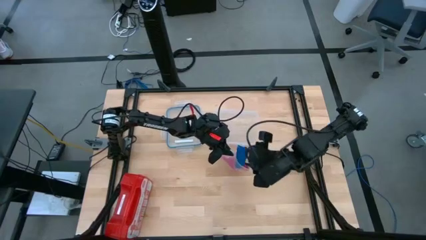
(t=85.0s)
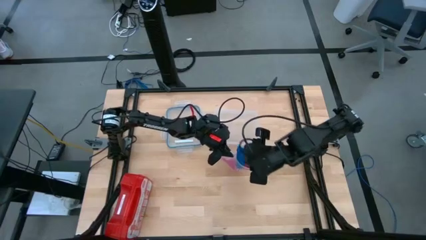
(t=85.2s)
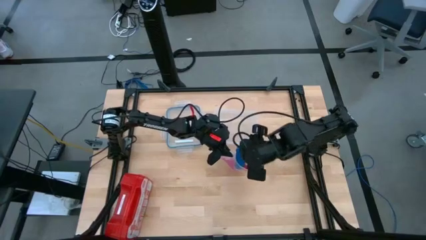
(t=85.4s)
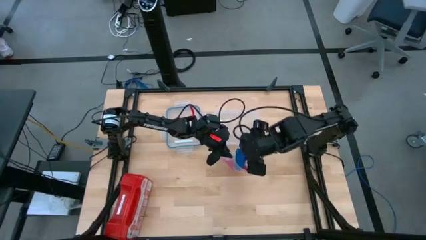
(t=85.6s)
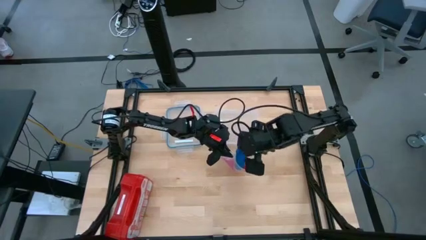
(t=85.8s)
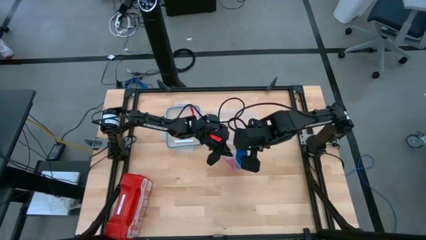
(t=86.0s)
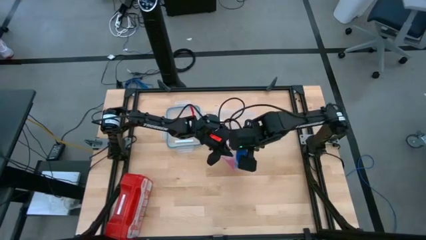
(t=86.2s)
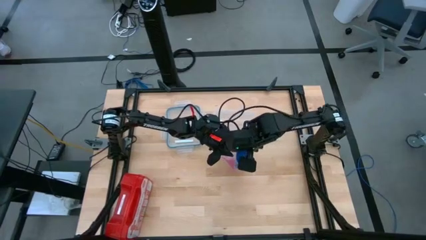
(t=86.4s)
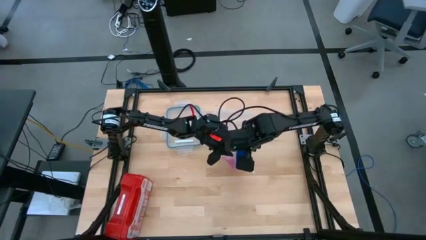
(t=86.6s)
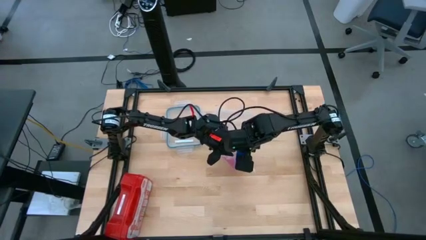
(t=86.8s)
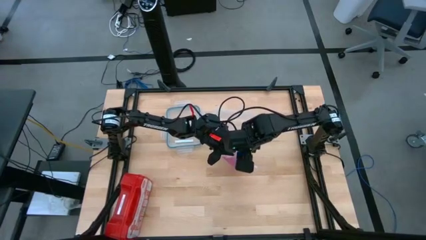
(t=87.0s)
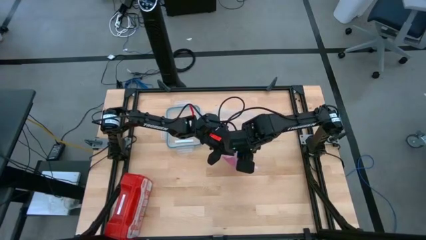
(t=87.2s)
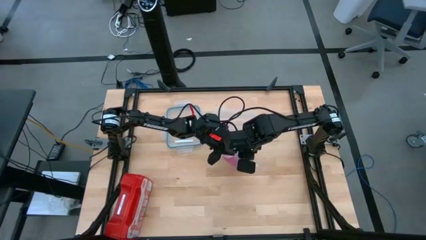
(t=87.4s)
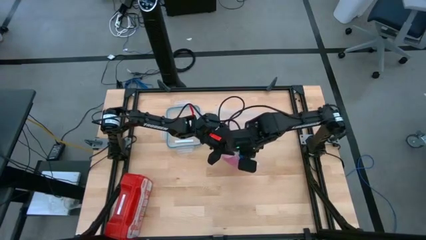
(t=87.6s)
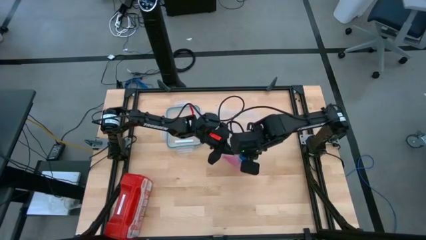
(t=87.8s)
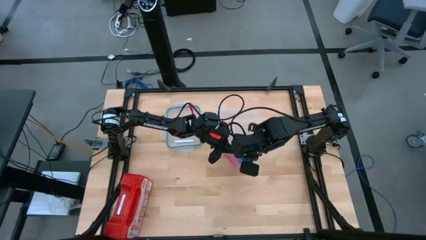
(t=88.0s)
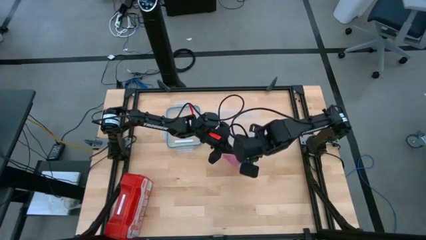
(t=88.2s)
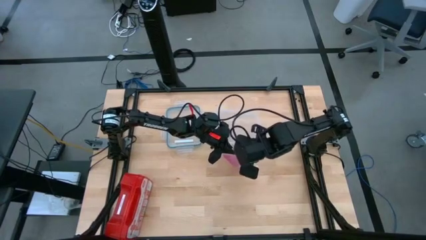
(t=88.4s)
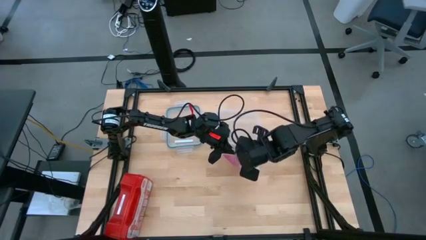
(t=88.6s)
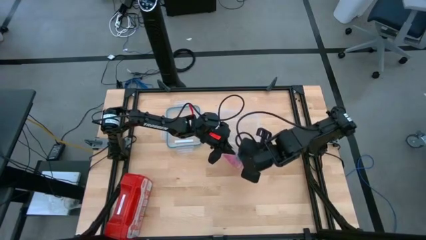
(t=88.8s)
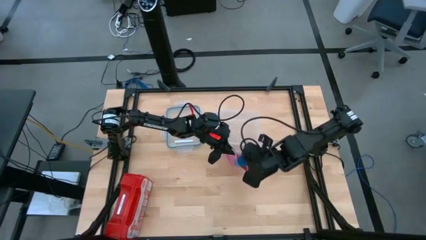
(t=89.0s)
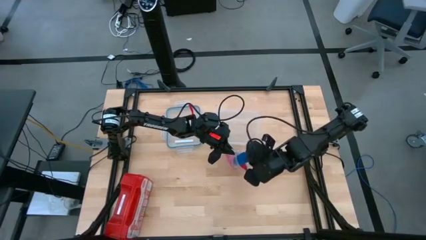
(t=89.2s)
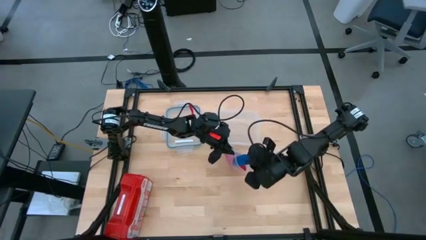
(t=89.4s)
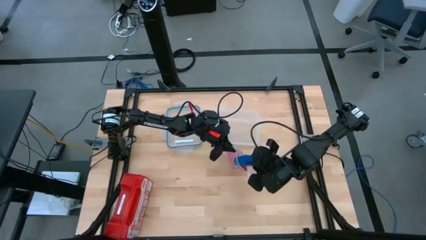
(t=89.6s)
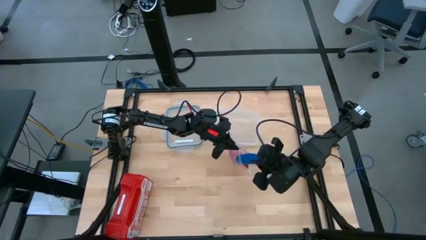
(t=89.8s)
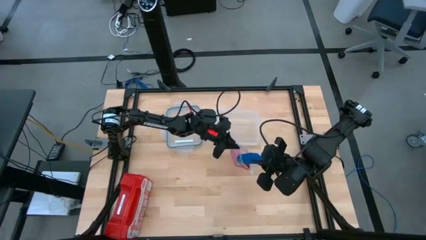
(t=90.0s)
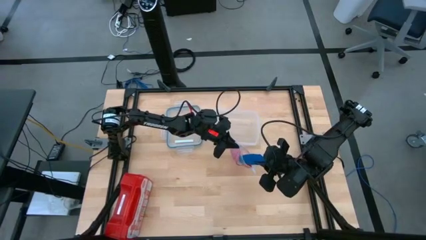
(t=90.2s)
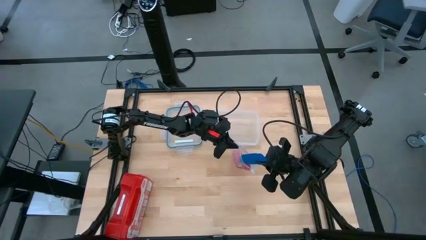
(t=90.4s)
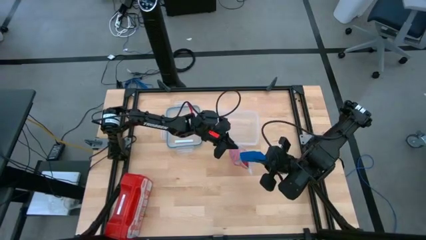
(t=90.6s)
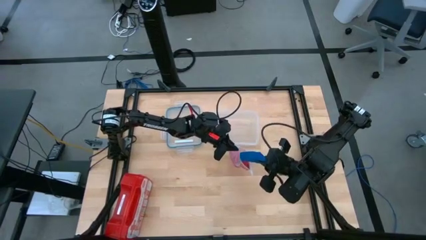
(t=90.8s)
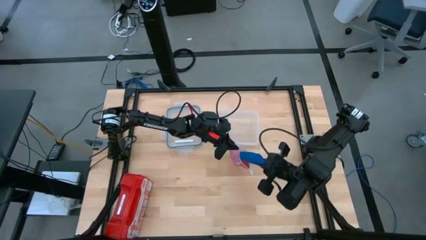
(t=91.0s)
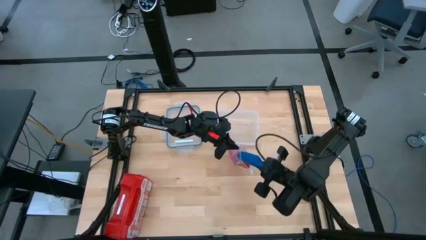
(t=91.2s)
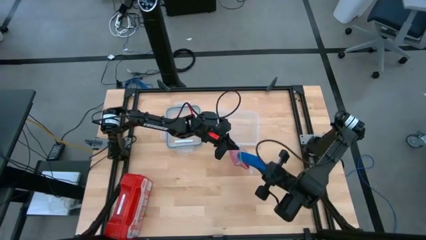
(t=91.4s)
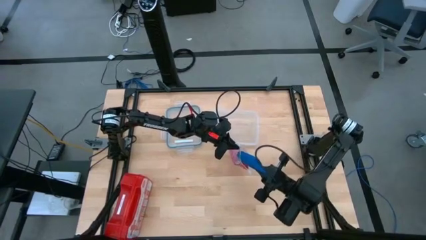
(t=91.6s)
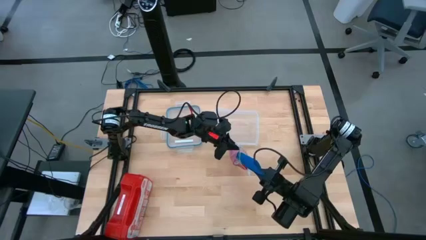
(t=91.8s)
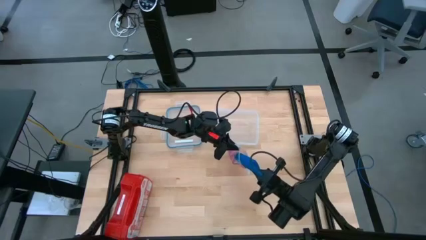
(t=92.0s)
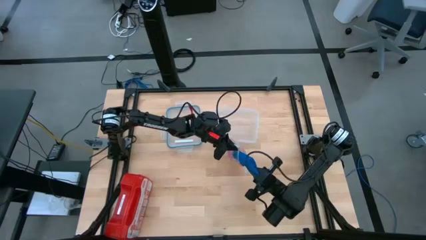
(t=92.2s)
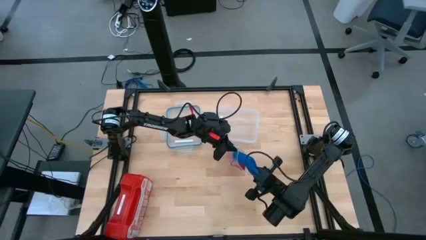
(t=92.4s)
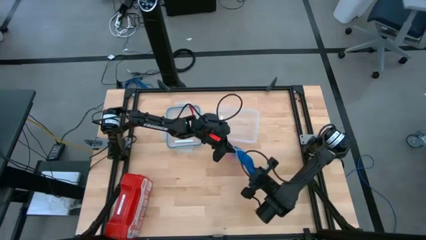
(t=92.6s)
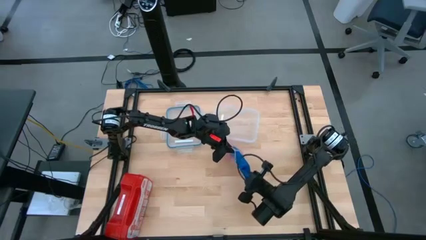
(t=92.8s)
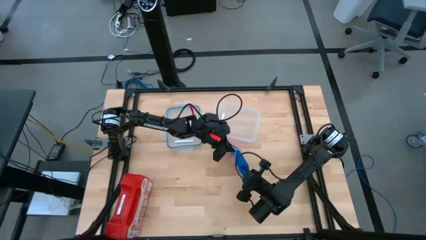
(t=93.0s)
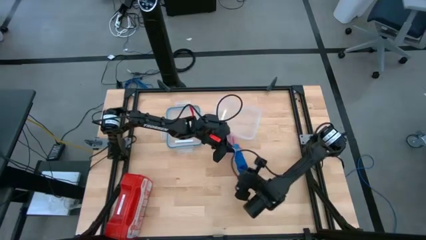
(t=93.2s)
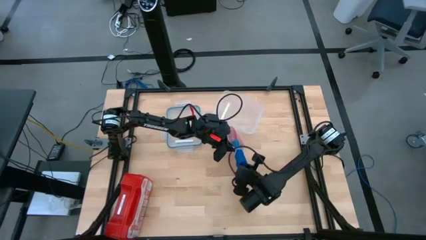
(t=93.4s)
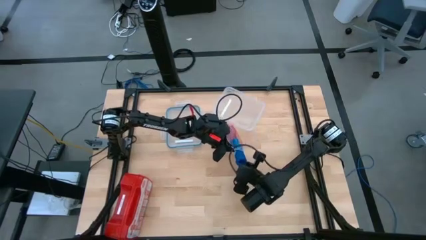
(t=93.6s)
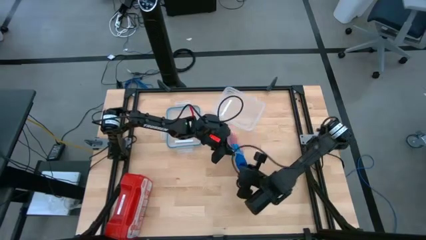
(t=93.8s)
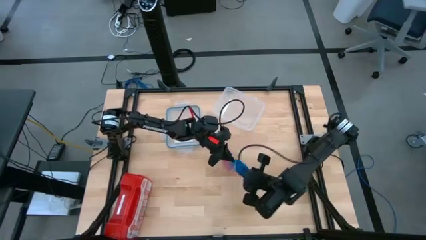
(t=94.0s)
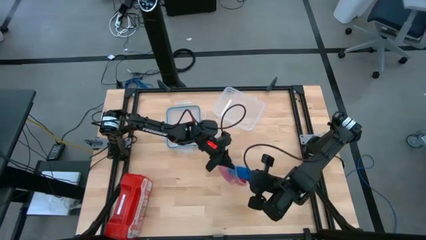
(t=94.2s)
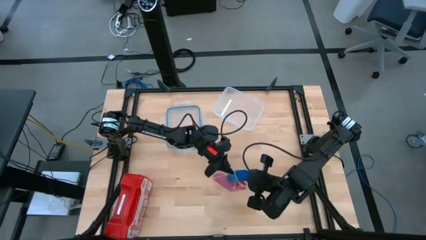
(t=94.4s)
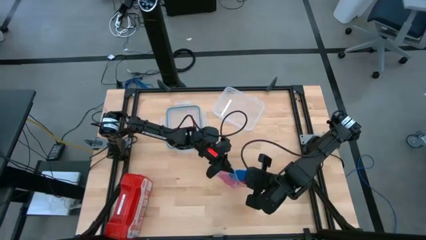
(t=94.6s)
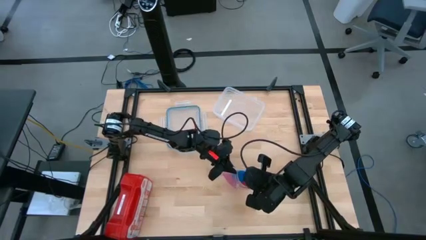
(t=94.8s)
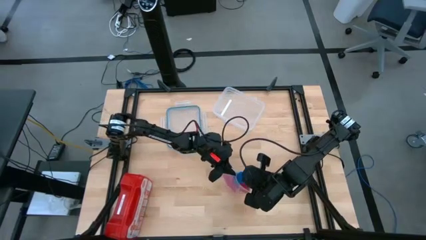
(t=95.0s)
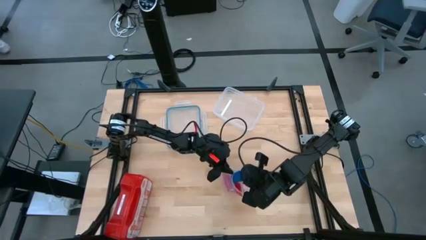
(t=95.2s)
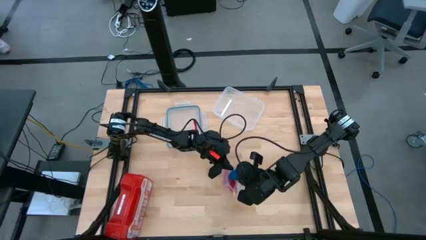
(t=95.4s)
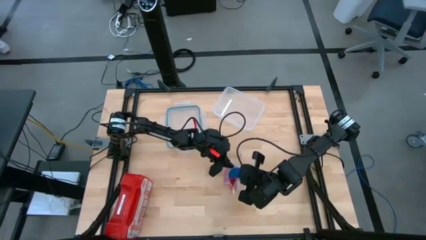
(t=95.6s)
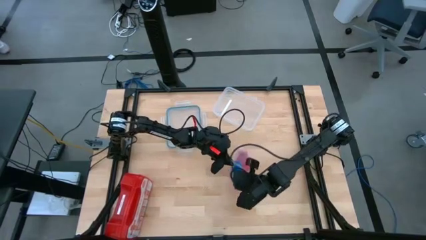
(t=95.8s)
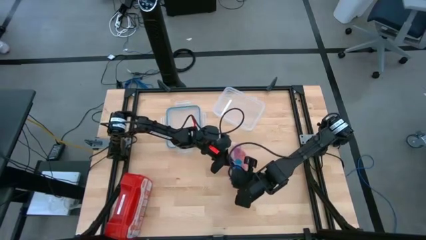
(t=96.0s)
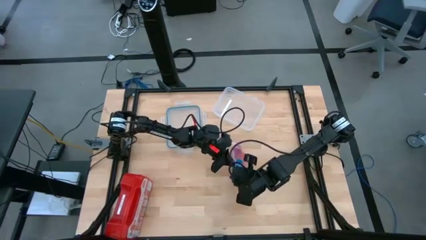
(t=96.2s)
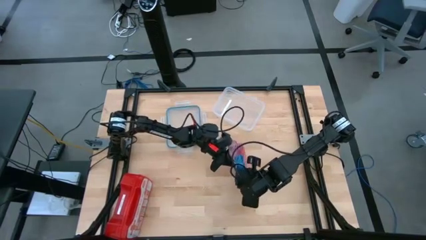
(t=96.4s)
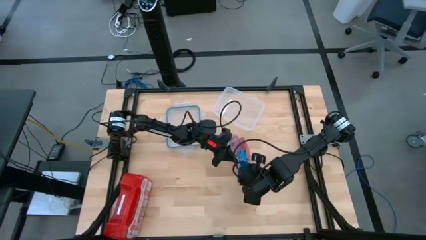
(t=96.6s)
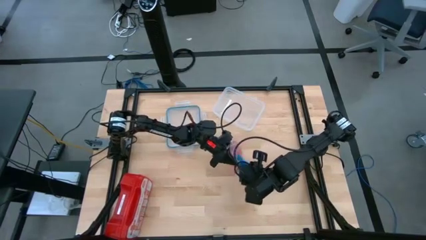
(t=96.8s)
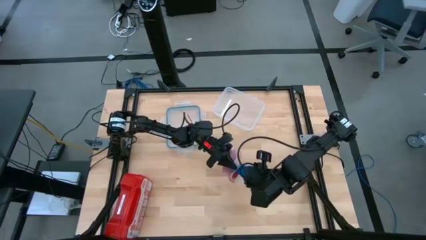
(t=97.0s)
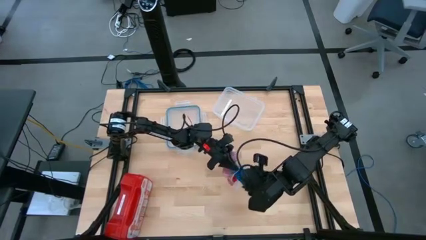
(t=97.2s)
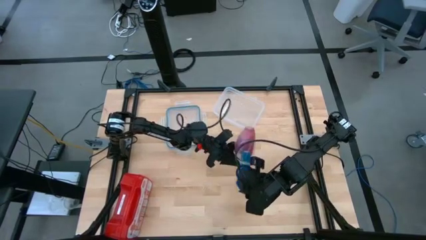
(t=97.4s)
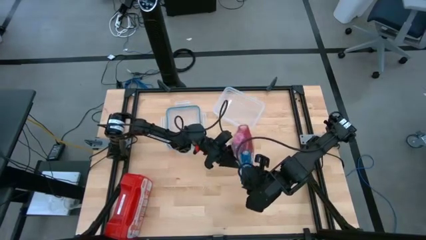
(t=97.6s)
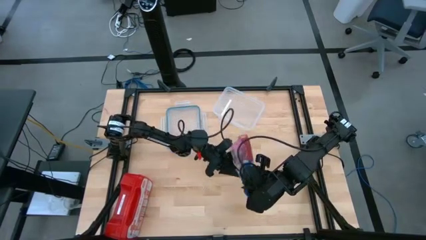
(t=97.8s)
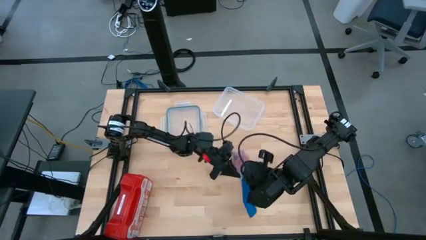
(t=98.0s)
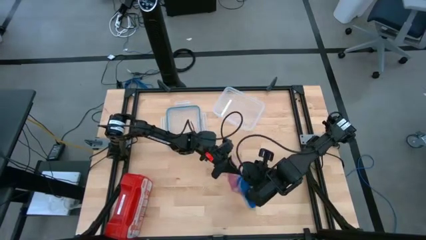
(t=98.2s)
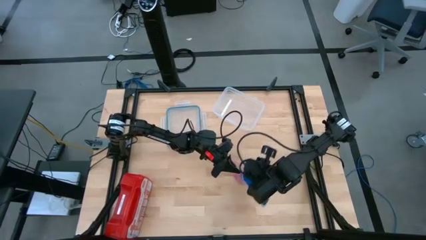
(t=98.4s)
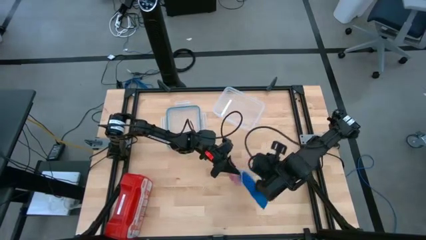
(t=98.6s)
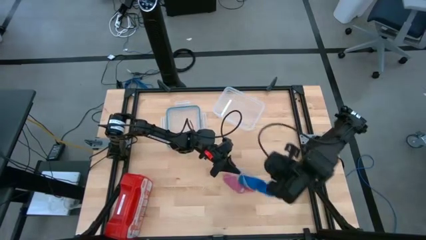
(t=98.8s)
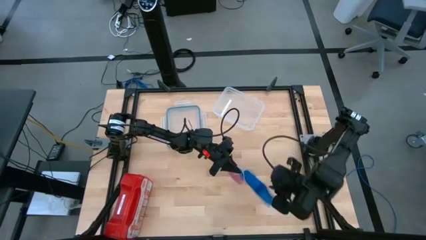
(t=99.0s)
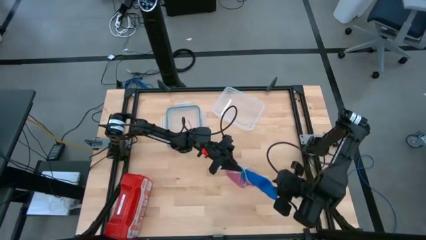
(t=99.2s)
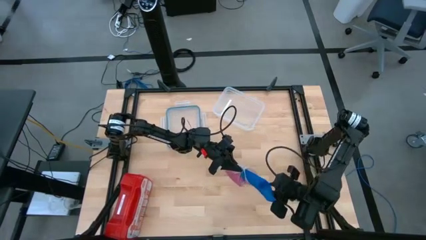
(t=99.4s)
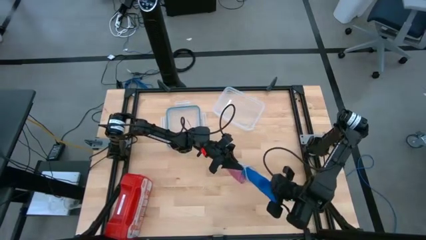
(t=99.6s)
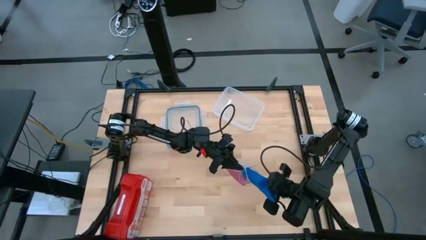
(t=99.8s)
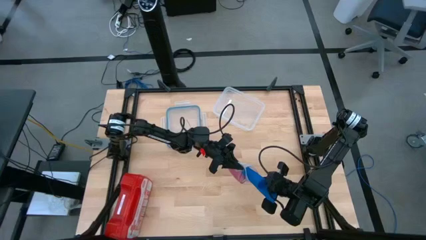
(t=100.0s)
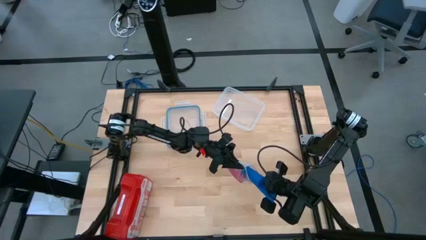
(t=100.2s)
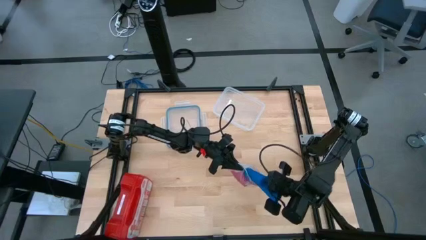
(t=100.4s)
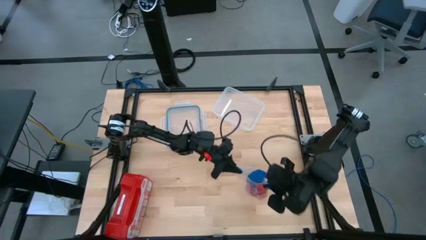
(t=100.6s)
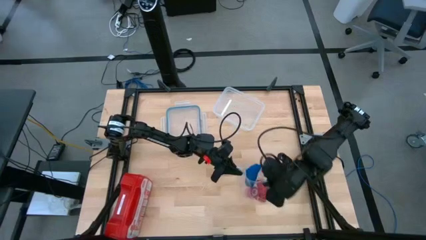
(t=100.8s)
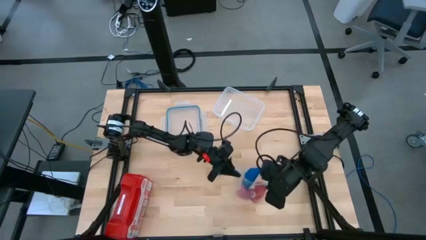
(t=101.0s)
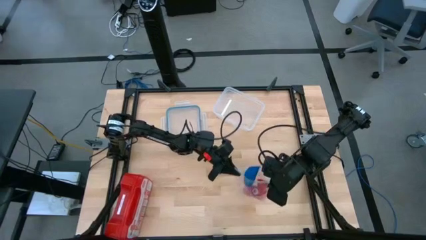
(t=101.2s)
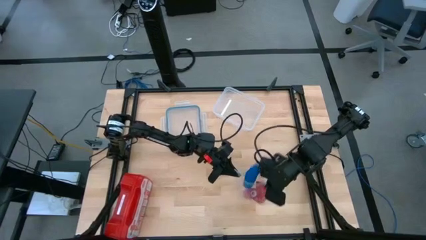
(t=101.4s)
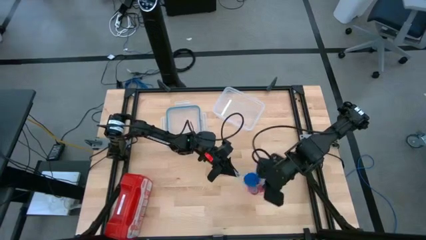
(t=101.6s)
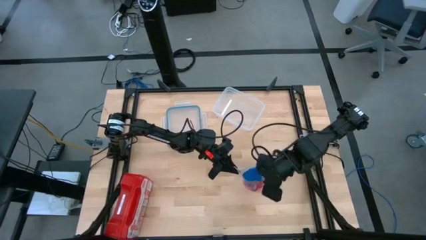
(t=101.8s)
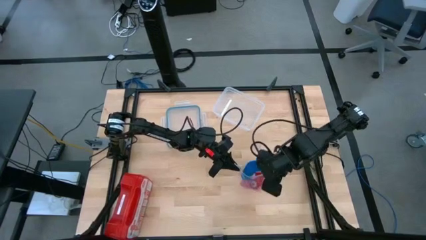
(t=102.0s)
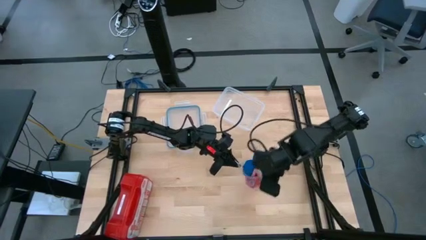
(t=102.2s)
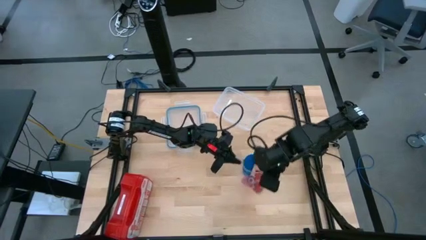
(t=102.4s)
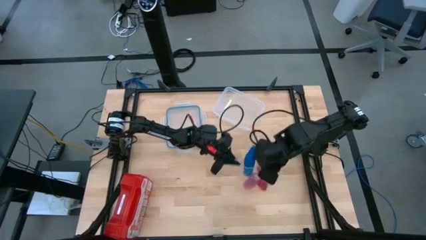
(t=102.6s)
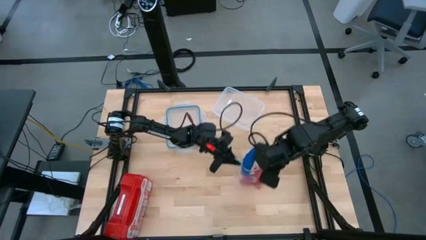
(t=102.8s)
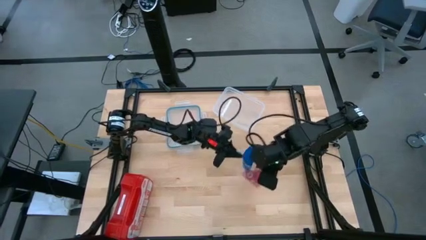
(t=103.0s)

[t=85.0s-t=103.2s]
Task: Roll bandage
Put the blue bandage into the transparent zip bag
